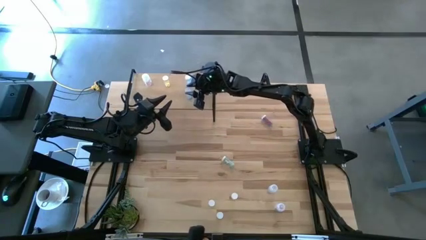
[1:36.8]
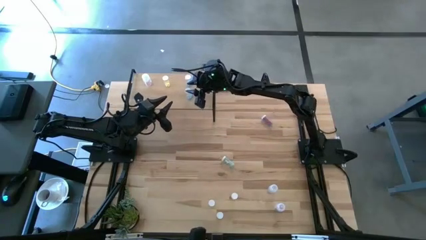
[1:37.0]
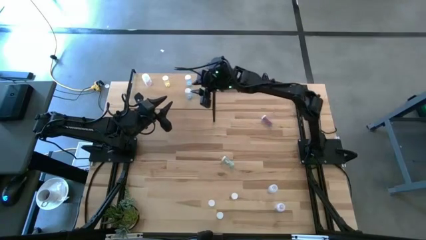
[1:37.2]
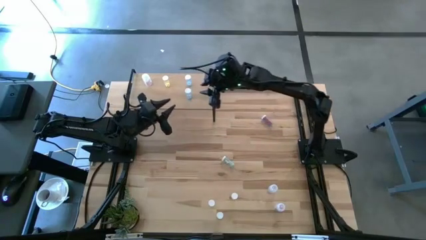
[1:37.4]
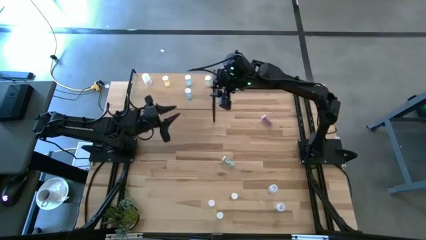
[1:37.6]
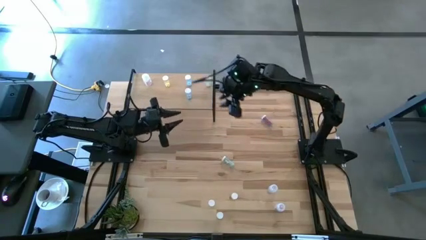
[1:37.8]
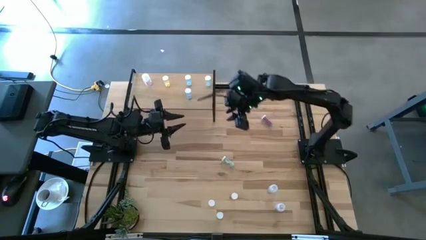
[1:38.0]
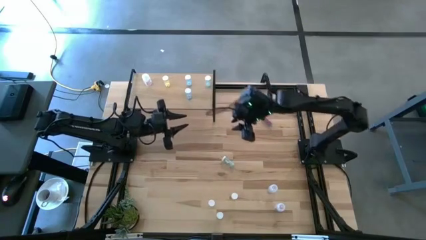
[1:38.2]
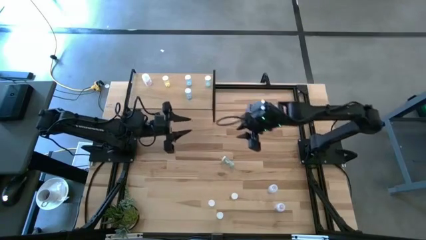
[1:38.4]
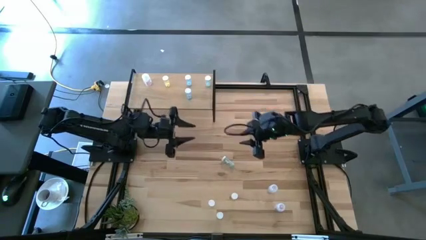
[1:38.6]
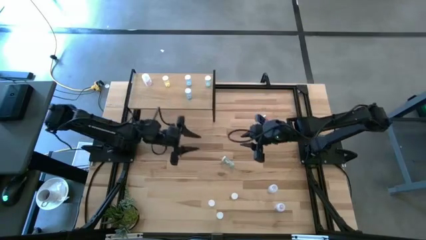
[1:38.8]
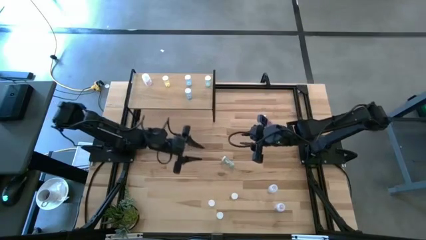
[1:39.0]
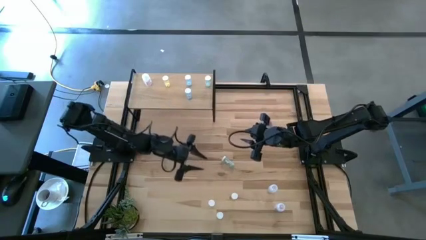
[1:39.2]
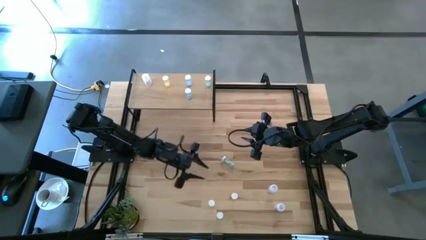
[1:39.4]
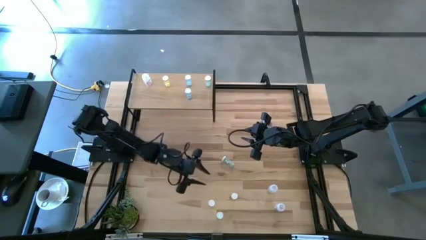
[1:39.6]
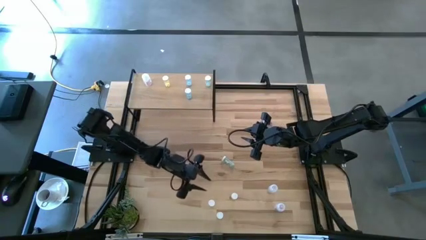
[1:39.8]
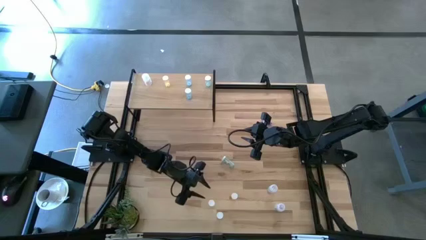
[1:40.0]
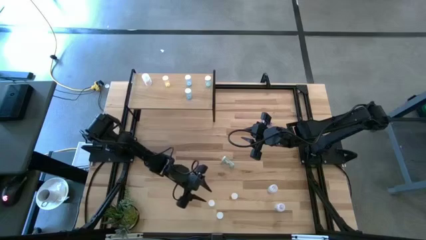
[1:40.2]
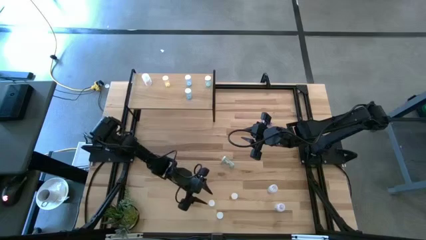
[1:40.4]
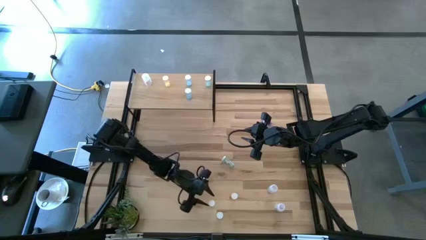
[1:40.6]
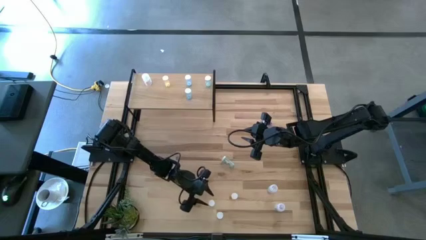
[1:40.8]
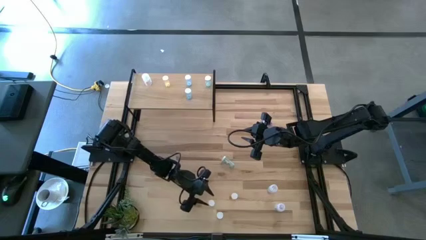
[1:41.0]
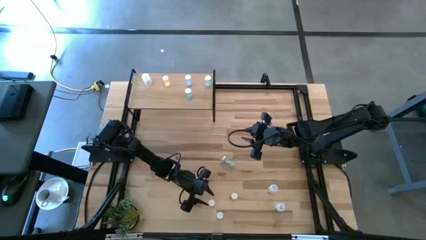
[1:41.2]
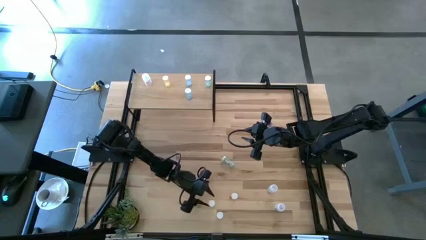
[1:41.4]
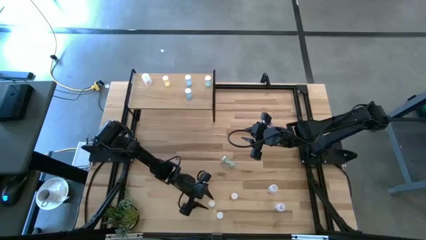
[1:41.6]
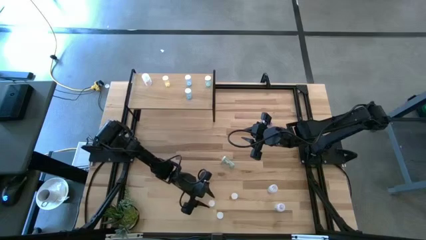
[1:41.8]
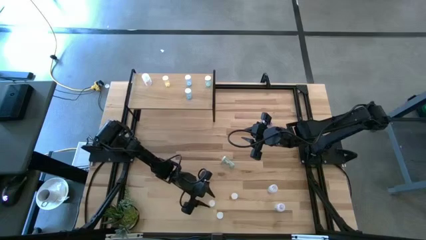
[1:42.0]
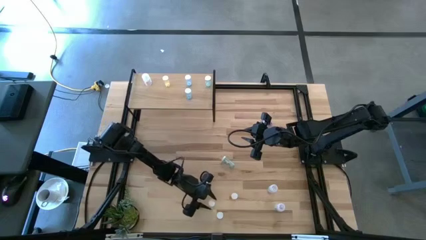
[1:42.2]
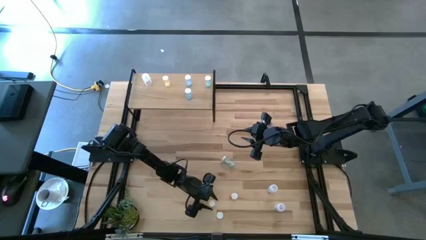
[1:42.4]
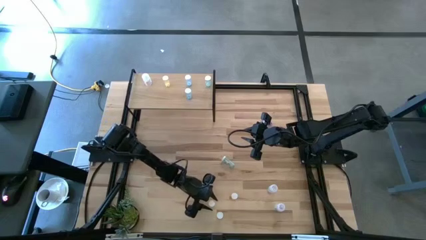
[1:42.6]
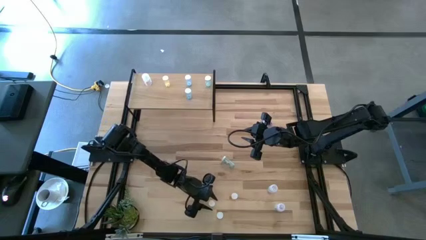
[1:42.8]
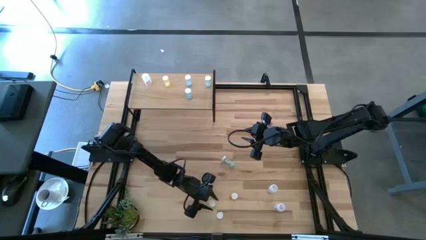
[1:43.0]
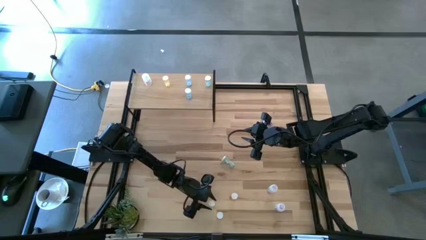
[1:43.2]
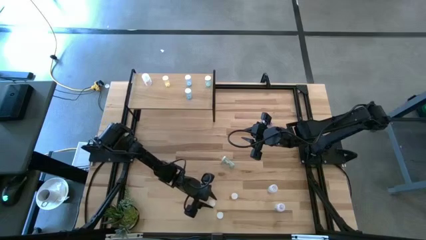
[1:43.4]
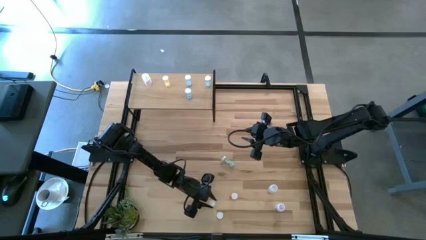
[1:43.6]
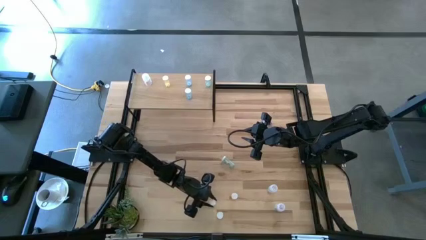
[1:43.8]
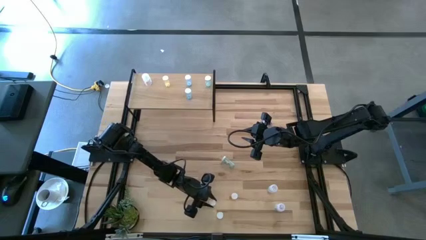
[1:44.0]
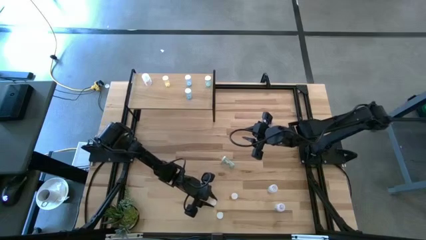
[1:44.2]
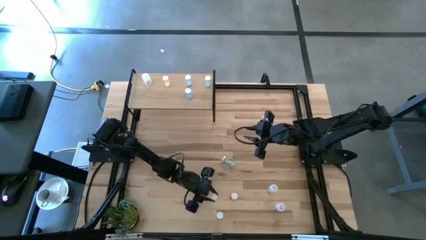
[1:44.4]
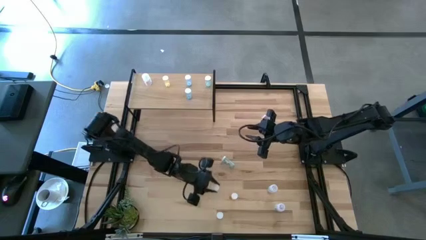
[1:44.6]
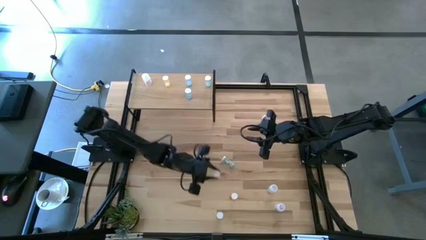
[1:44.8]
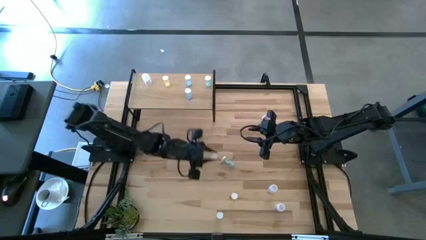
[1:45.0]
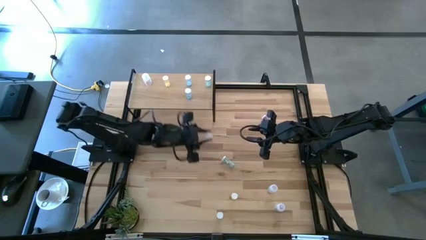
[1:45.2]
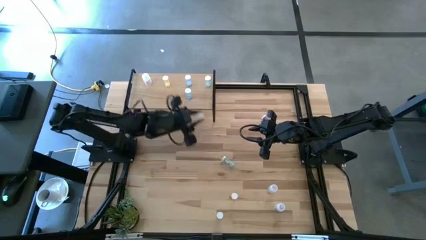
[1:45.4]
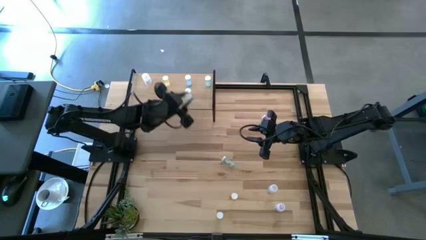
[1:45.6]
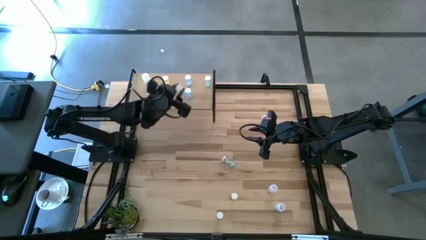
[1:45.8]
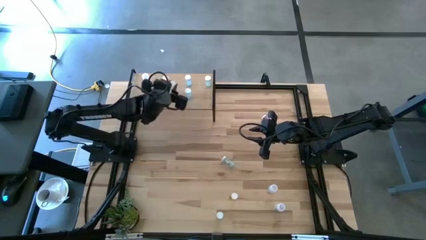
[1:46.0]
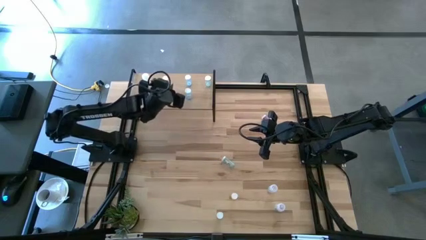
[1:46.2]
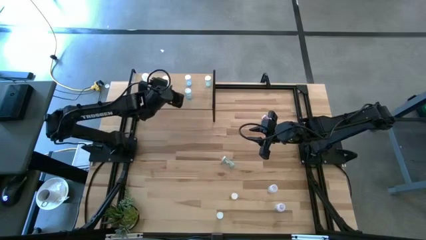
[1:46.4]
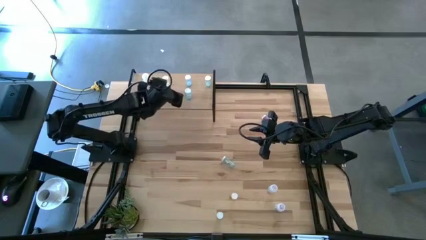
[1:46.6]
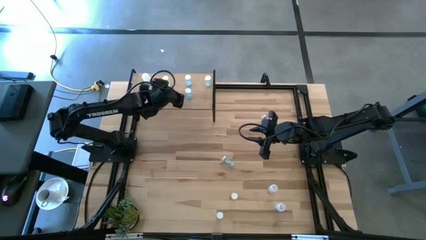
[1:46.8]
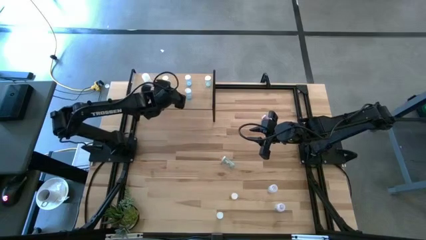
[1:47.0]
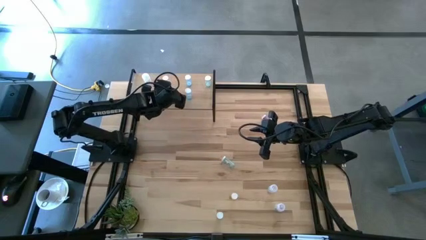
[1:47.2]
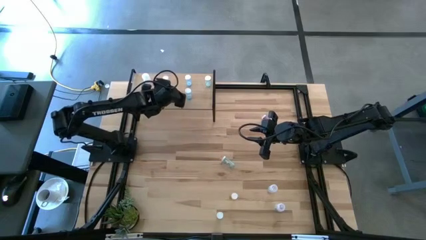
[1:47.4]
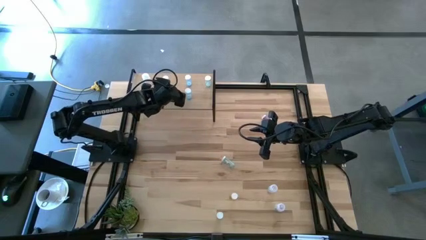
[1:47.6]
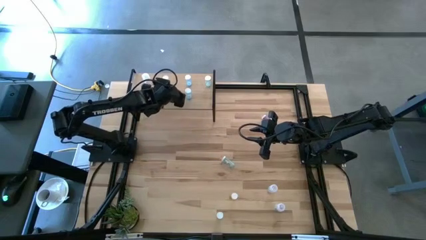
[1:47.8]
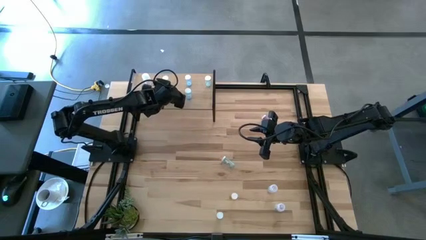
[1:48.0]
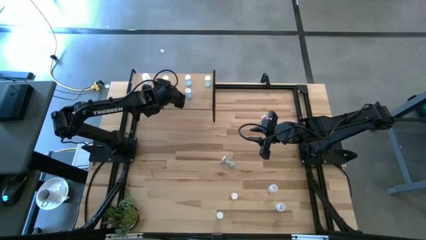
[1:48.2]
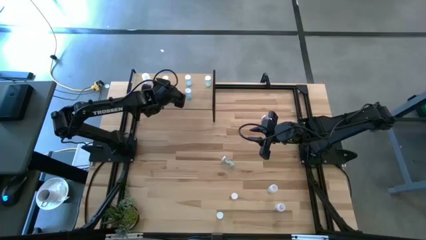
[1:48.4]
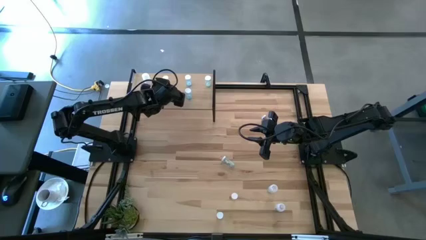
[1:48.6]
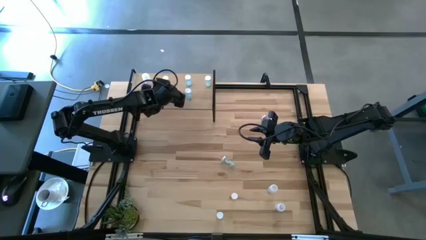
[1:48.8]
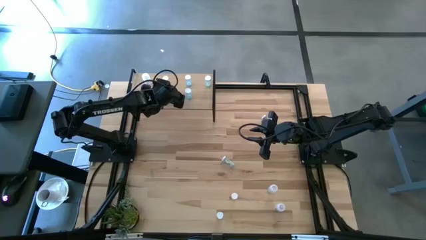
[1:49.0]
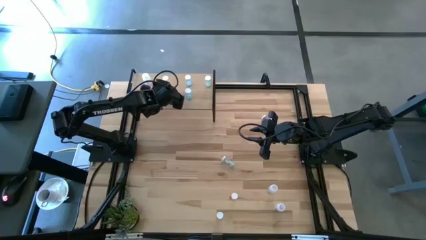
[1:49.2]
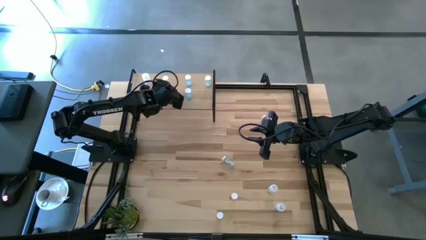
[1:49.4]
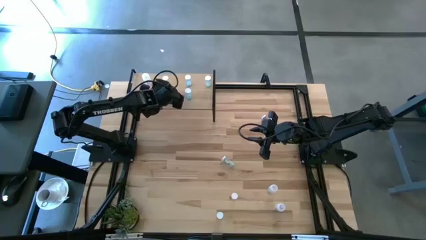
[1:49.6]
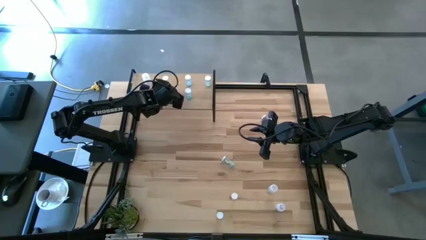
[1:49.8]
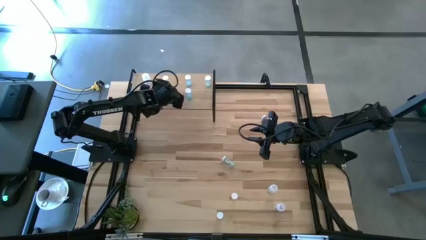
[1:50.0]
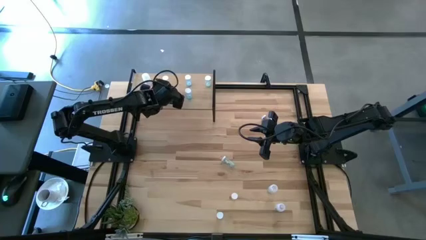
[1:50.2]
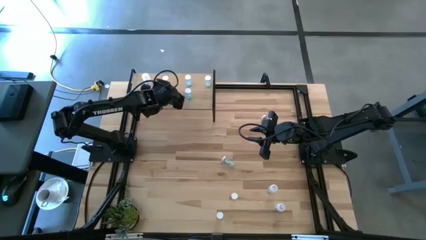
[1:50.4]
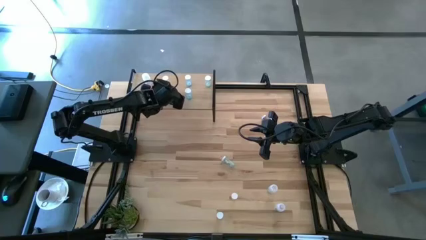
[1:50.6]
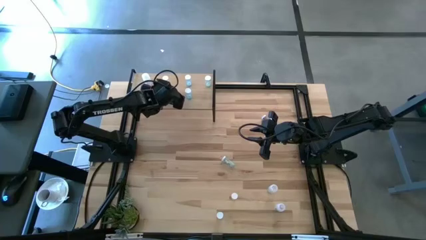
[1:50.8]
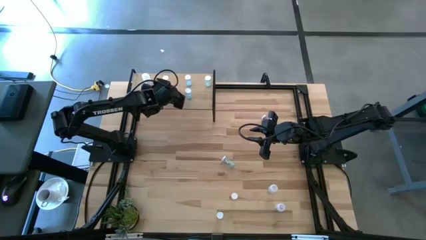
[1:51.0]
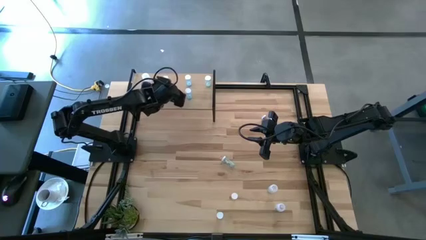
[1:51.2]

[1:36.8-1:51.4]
Task: Pick and place medicine bottles onto shelf by color
Put the left yellow pill bottle on the shelf aligned with the other yellow pill bottle
